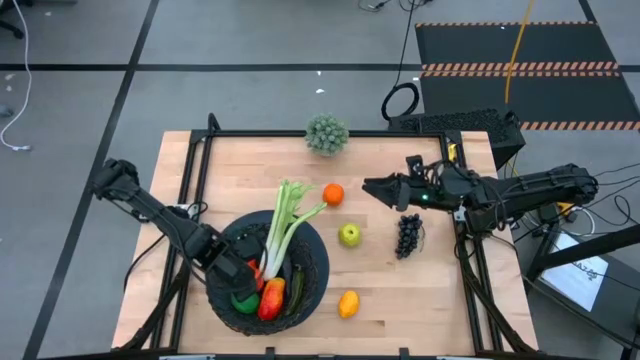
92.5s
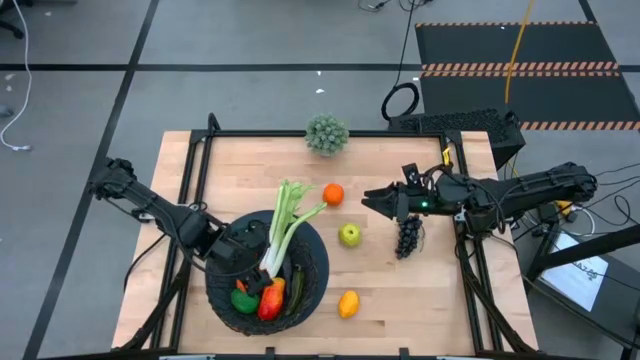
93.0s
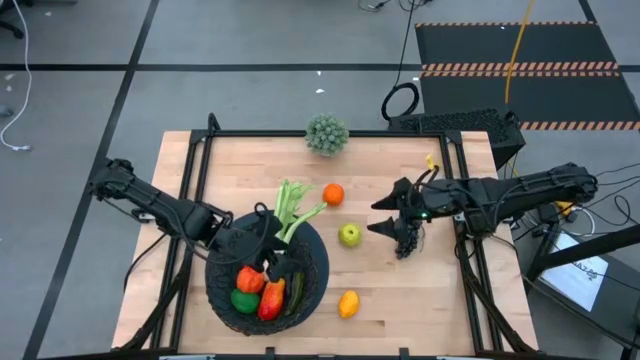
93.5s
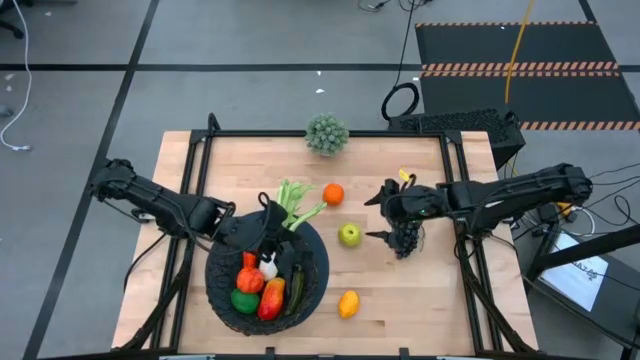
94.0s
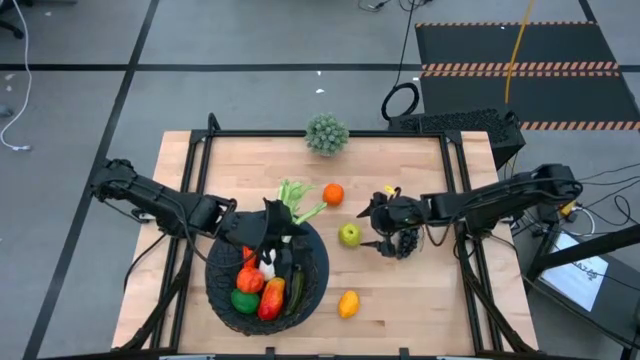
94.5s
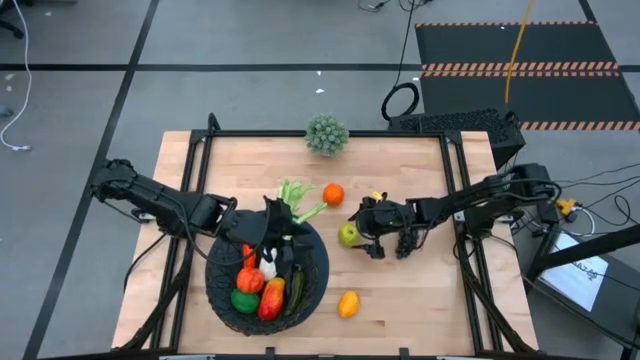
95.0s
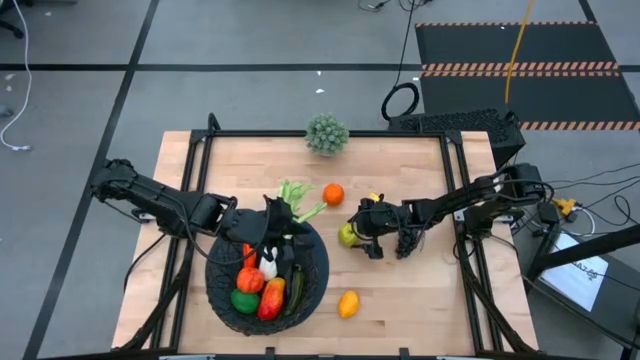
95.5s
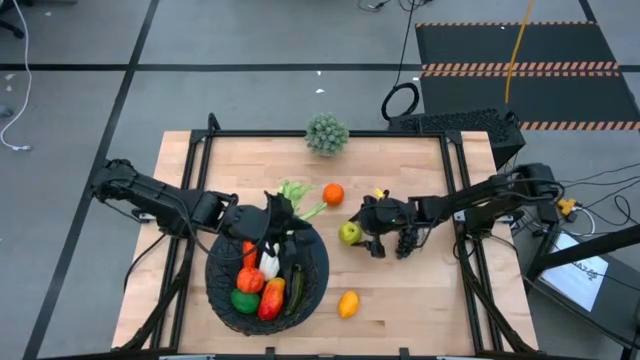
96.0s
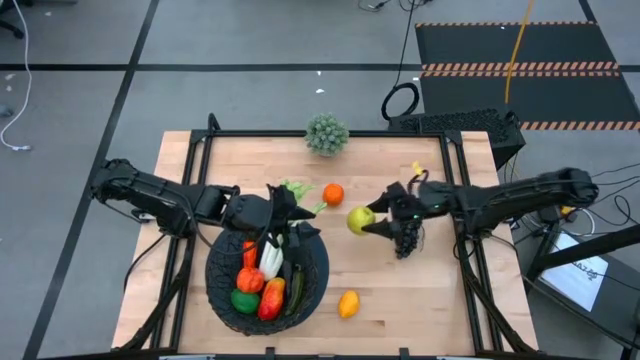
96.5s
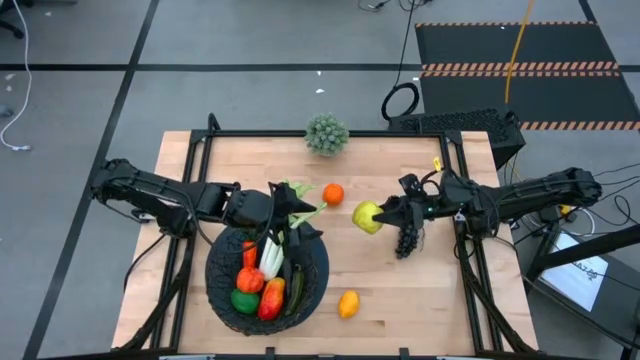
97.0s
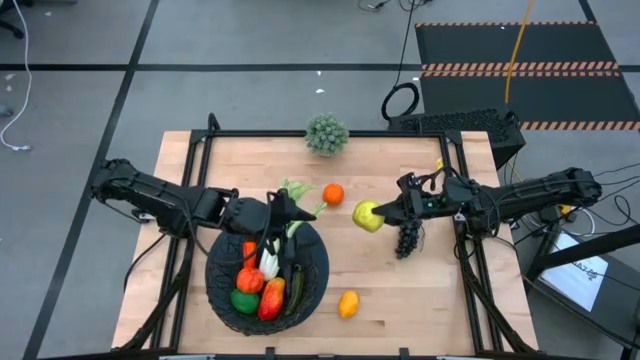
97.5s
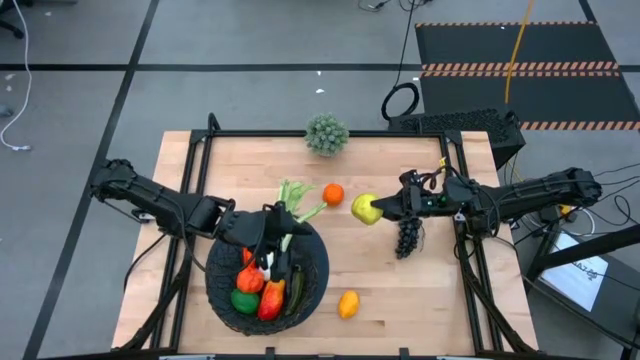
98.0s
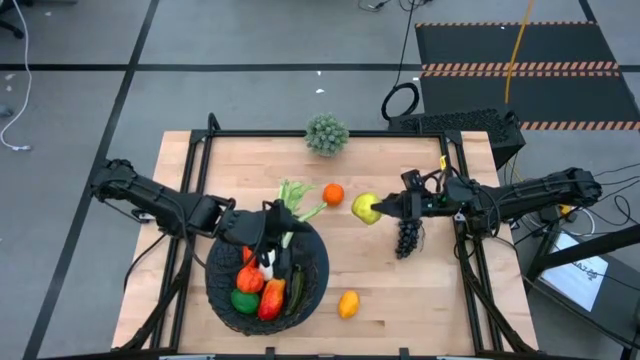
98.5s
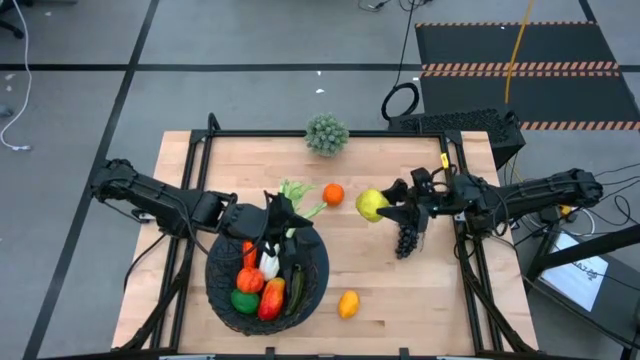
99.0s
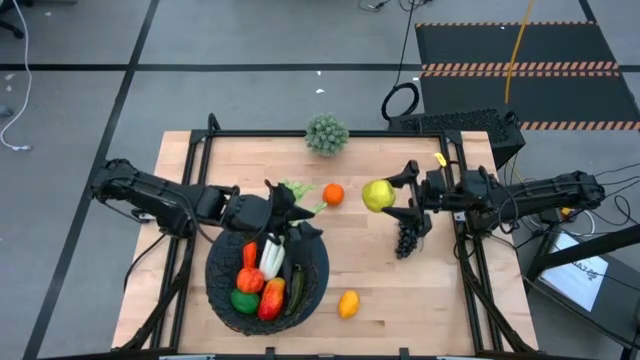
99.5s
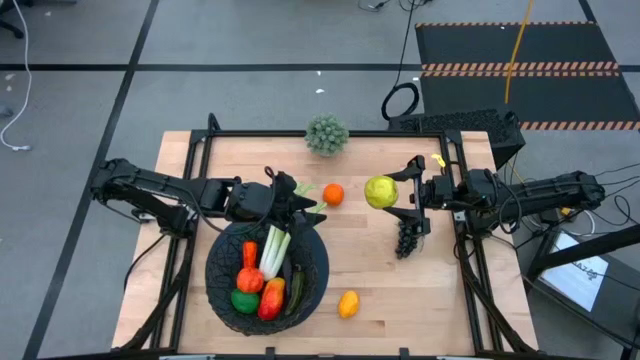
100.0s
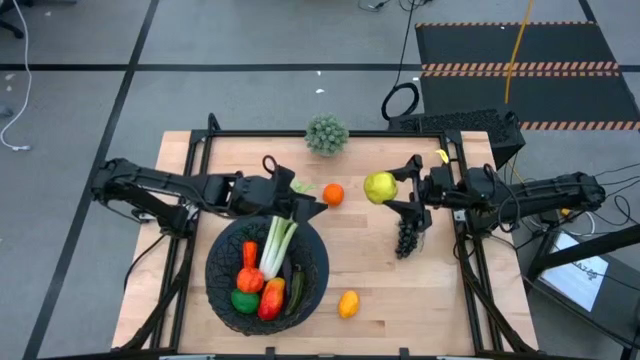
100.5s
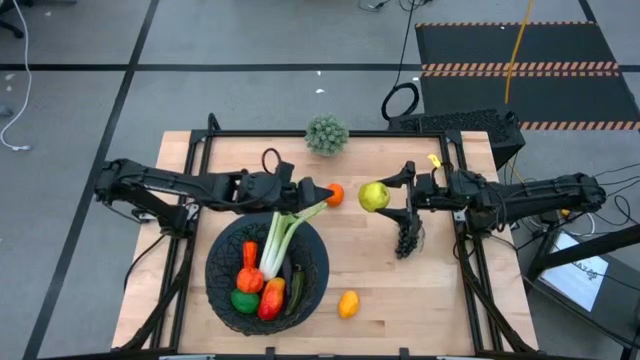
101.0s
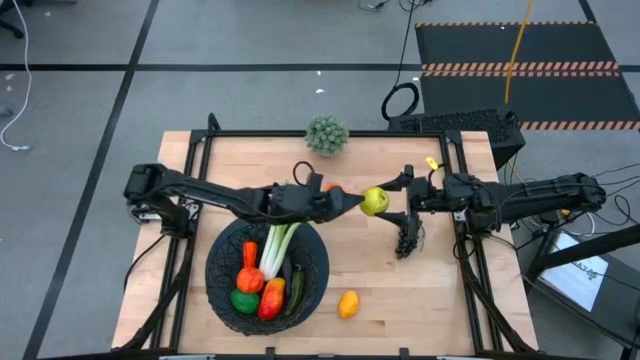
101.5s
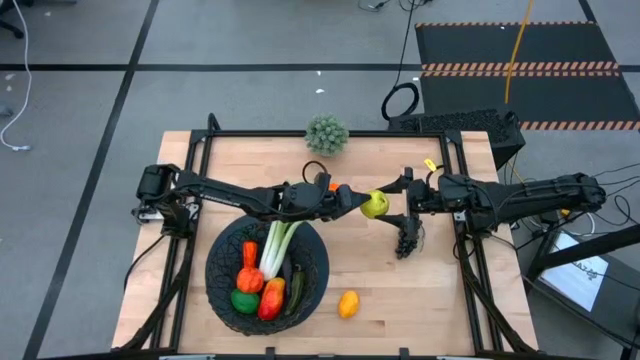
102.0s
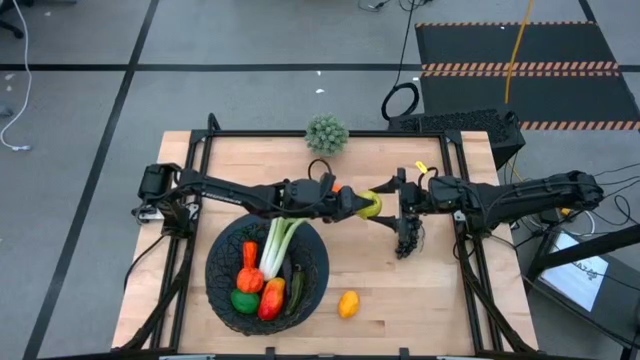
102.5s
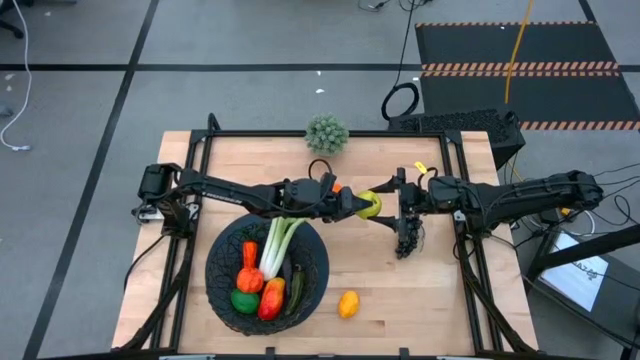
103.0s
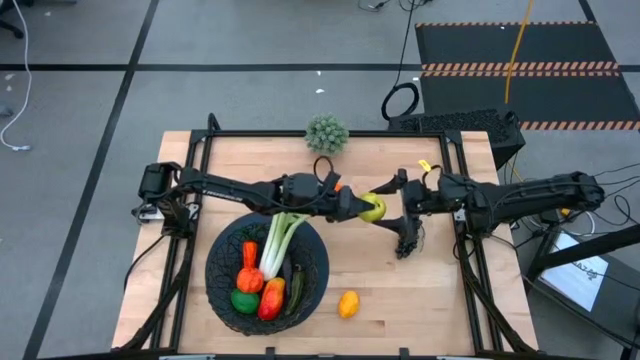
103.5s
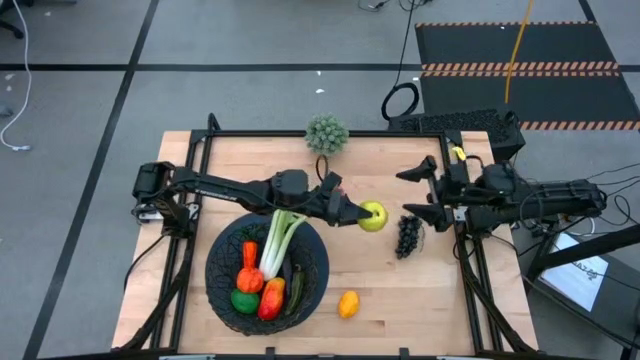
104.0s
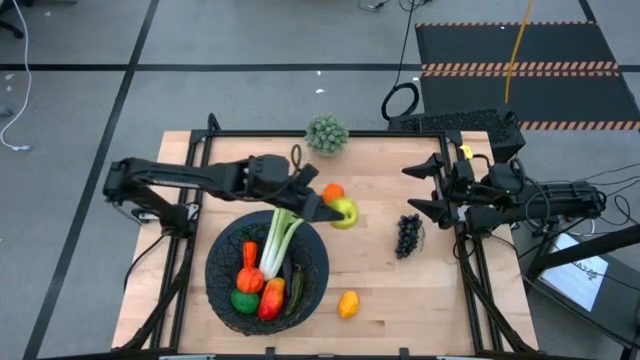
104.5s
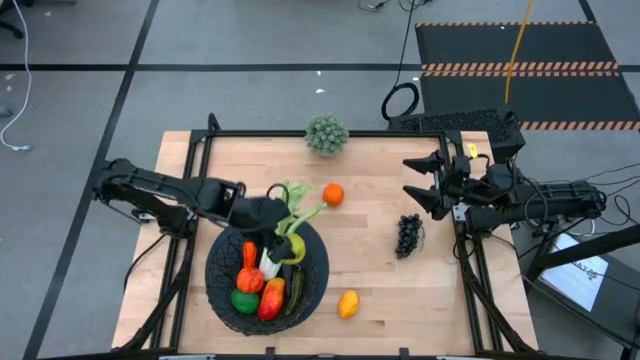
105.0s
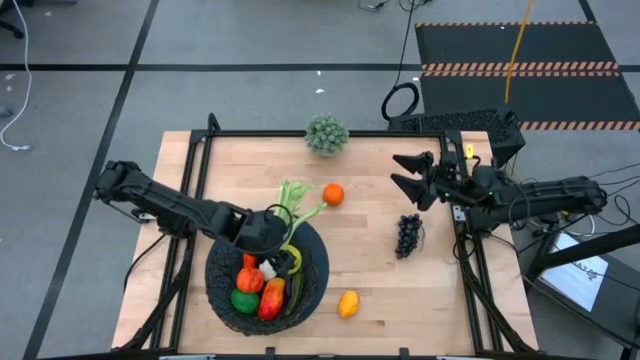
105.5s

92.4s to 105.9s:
Task: Build produce basket
Put the green apple into the black wire basket

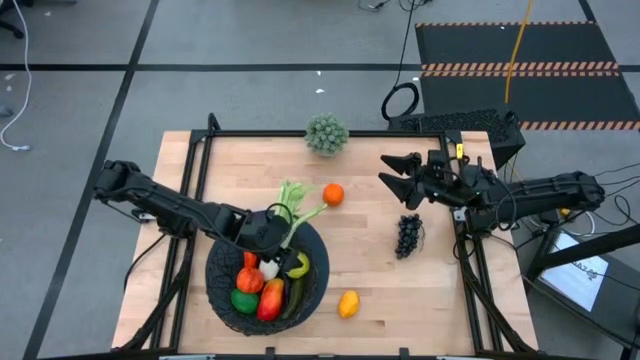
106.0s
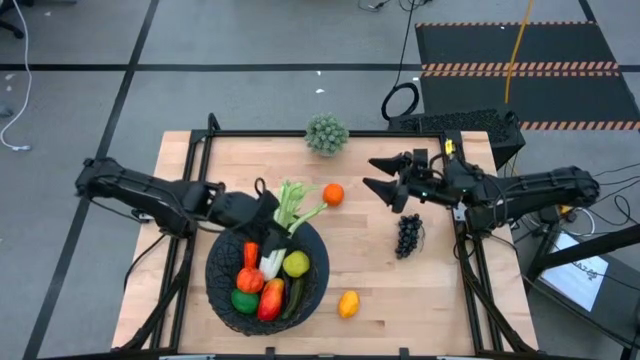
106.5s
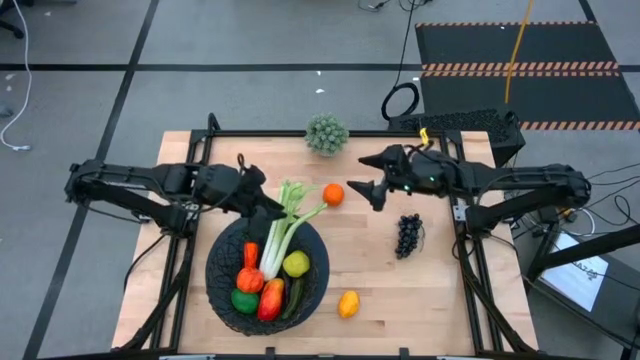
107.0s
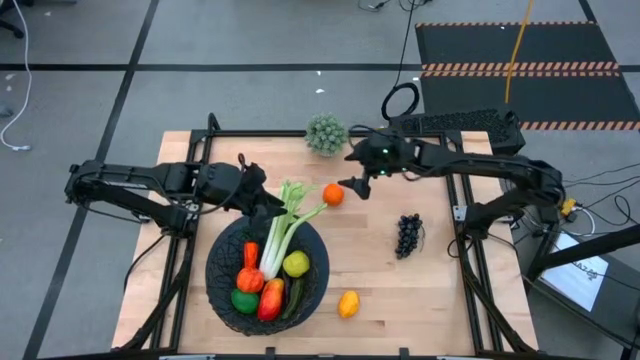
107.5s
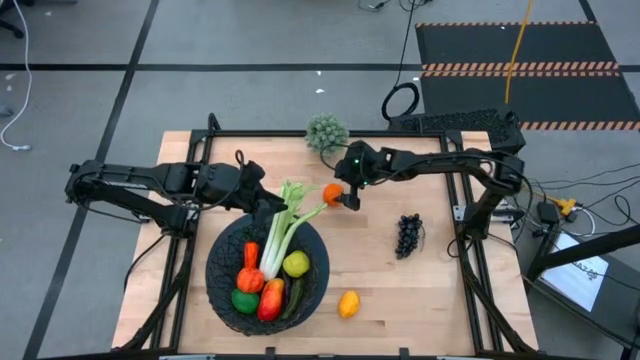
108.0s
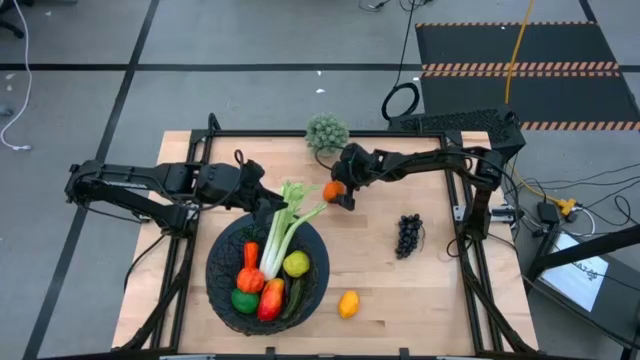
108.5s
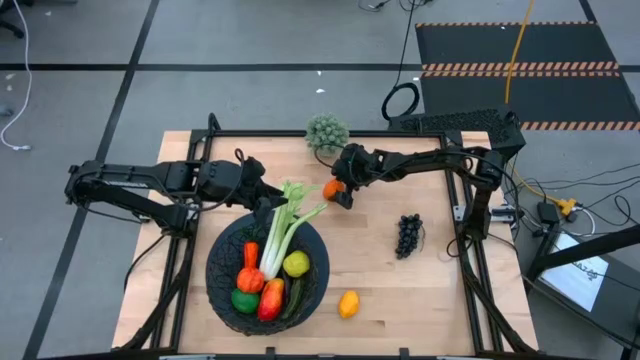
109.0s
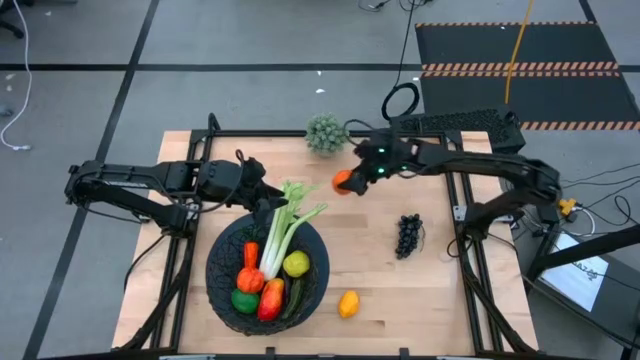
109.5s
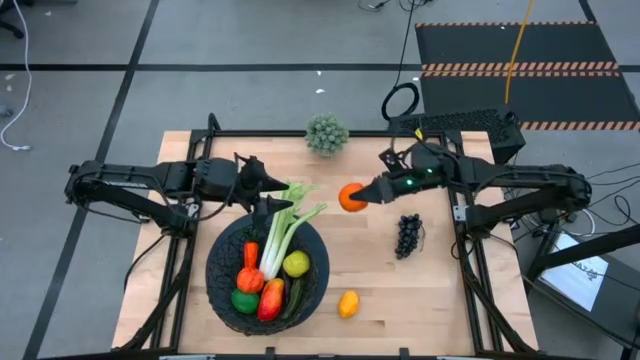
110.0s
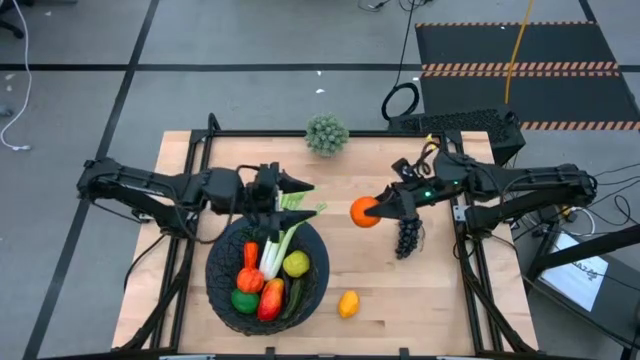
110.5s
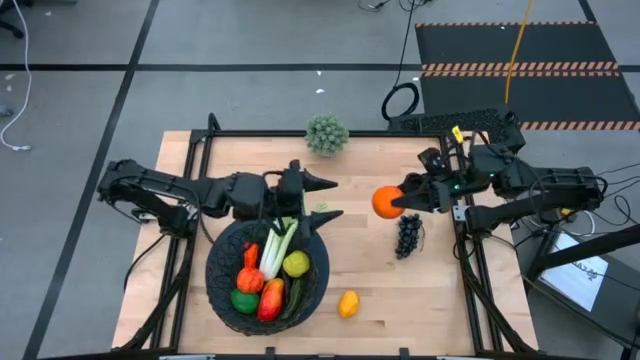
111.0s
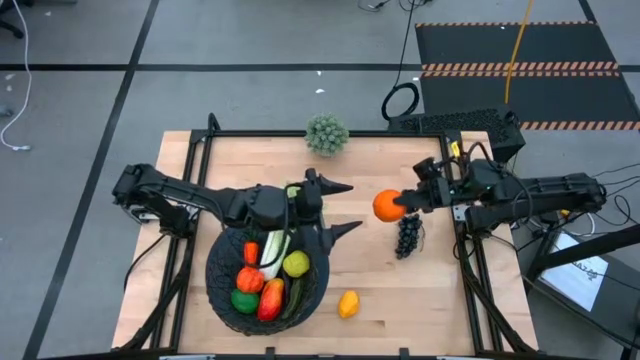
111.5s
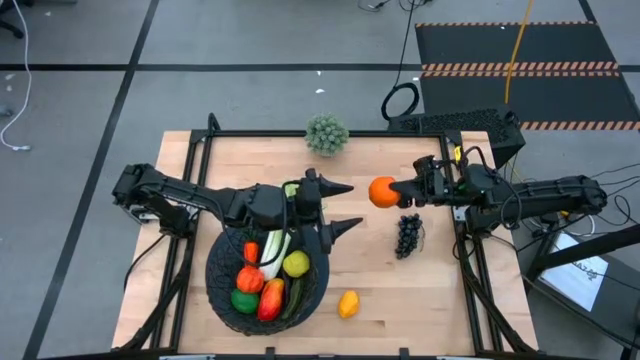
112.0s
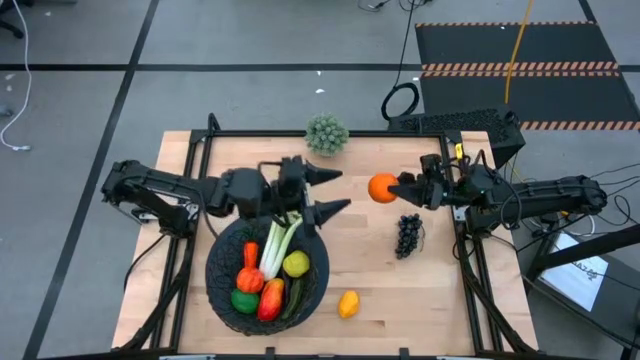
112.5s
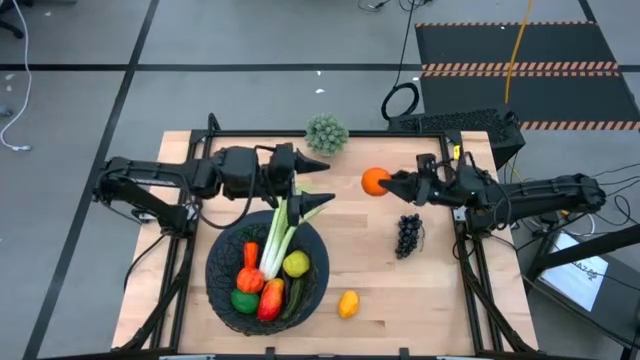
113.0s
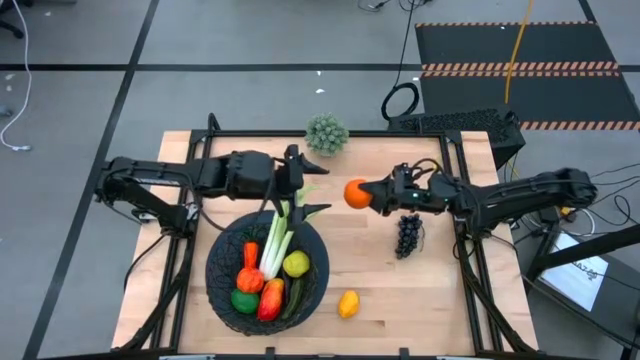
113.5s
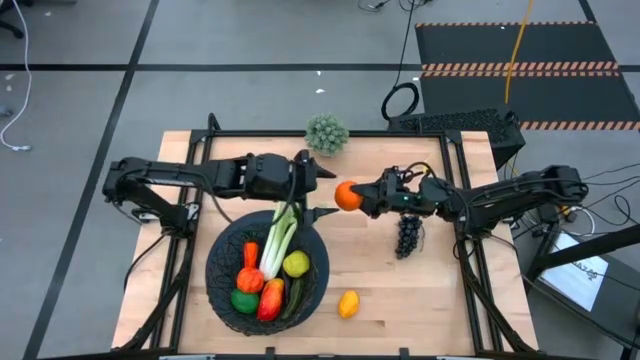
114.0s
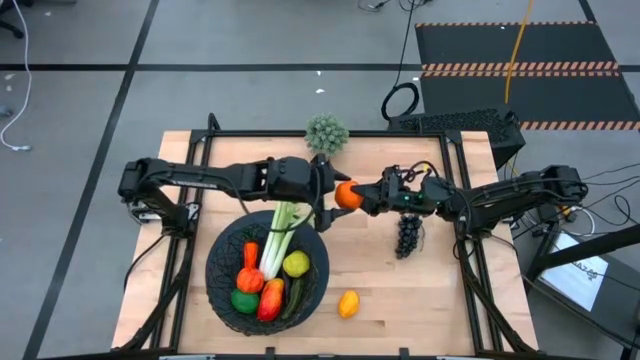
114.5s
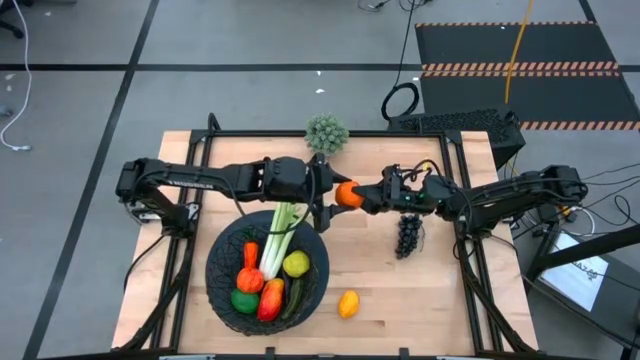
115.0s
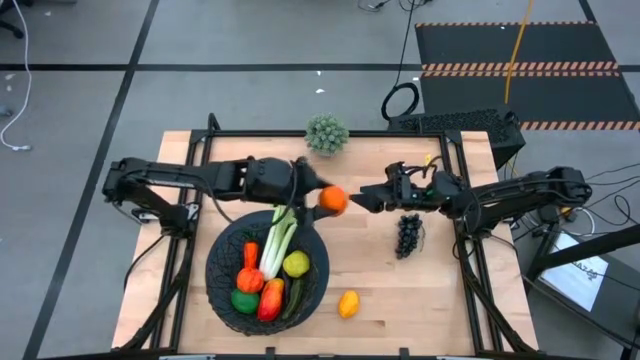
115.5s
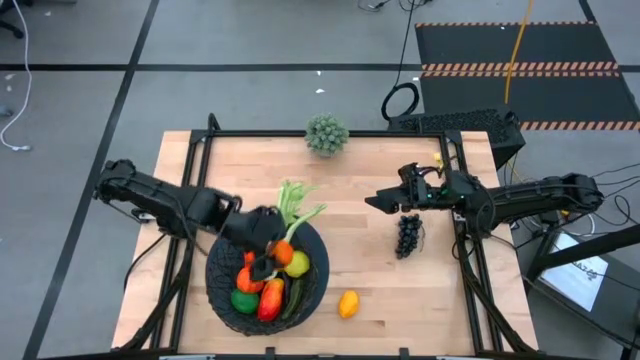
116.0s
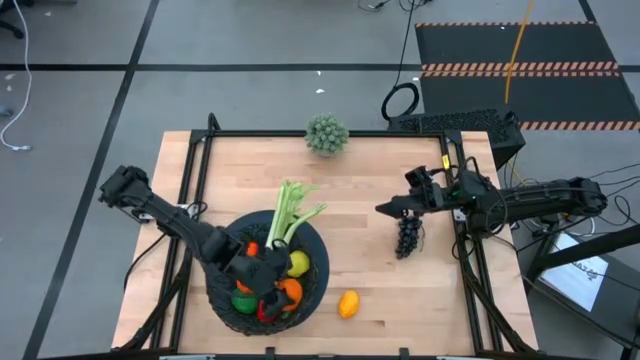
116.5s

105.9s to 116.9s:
Put the orange into the black wire basket
